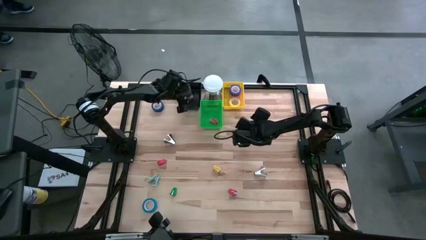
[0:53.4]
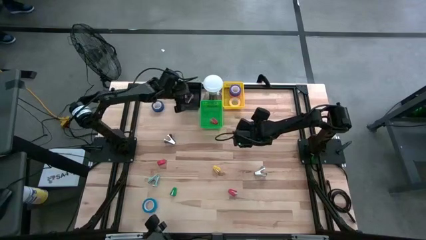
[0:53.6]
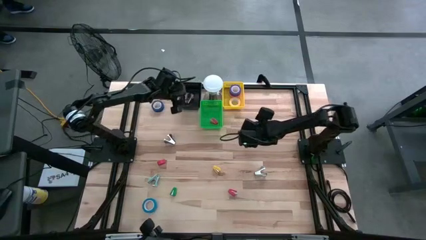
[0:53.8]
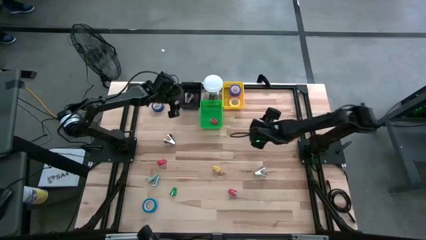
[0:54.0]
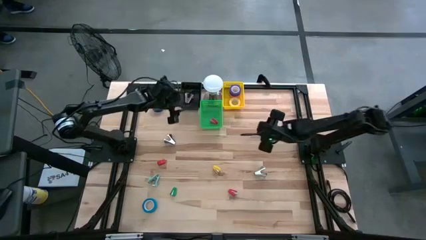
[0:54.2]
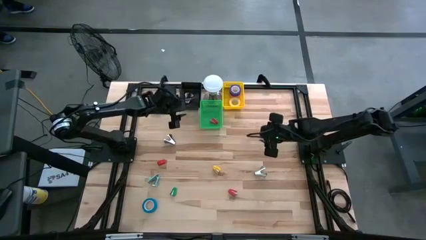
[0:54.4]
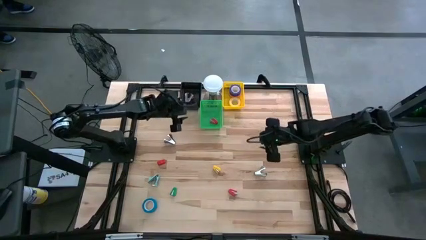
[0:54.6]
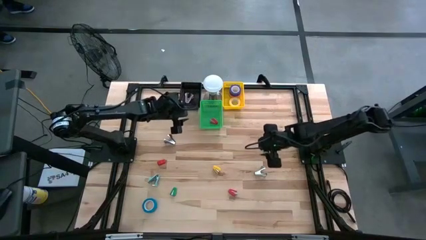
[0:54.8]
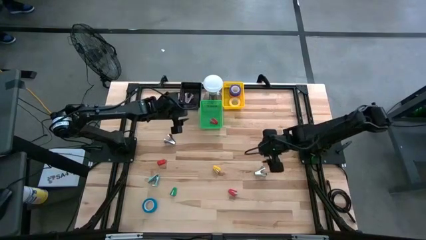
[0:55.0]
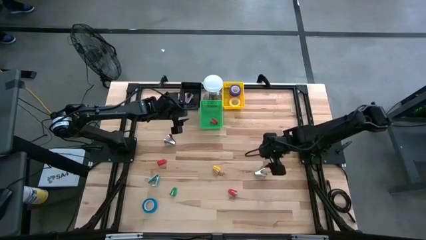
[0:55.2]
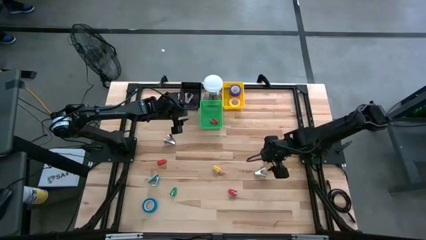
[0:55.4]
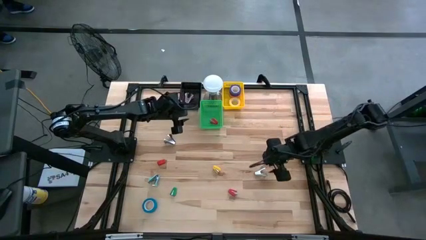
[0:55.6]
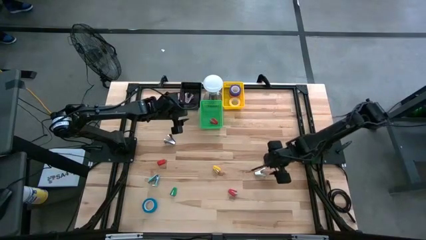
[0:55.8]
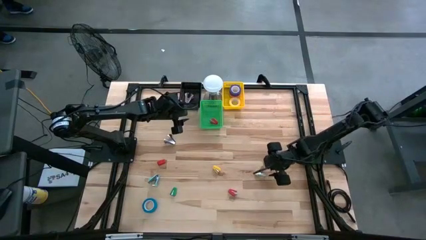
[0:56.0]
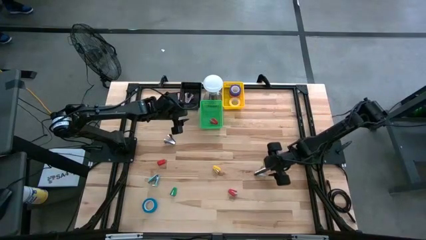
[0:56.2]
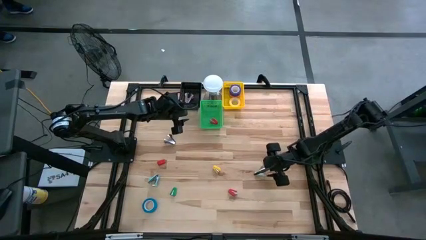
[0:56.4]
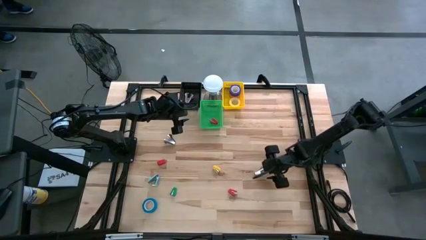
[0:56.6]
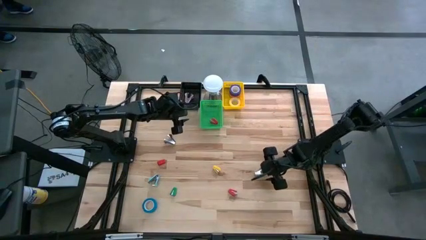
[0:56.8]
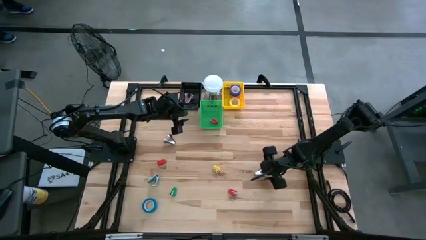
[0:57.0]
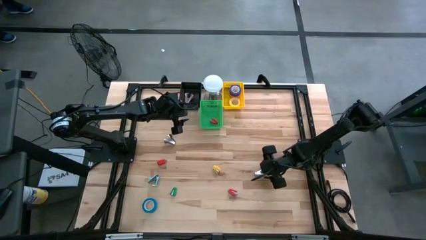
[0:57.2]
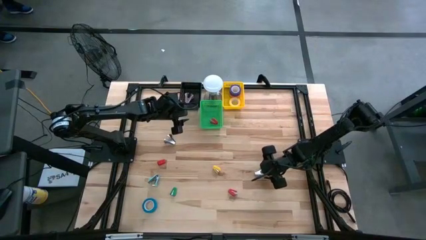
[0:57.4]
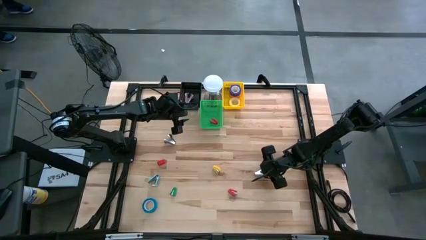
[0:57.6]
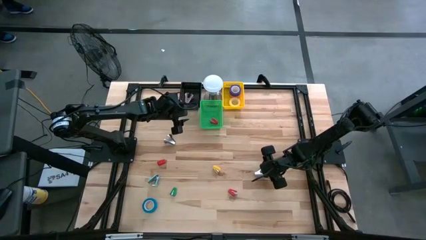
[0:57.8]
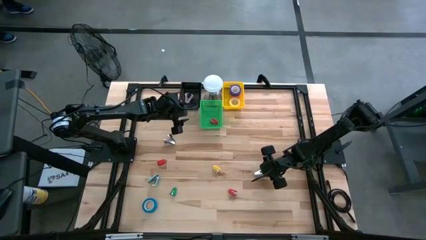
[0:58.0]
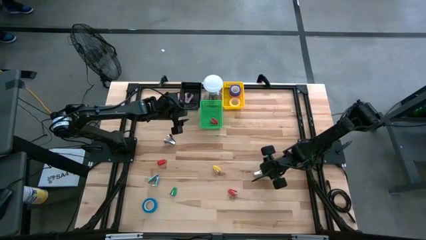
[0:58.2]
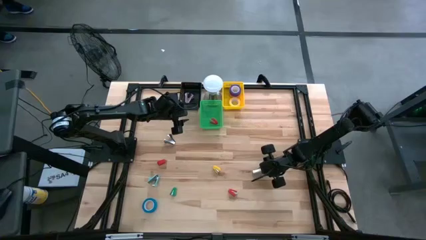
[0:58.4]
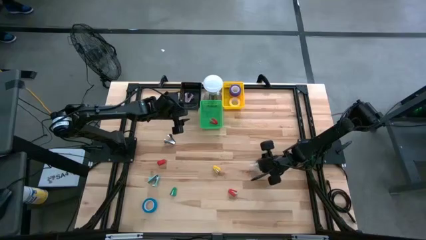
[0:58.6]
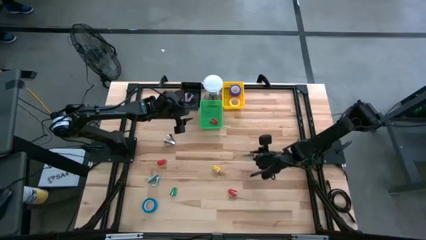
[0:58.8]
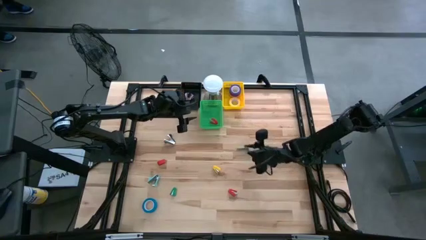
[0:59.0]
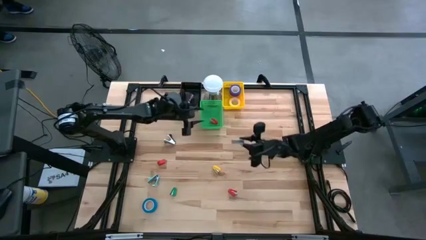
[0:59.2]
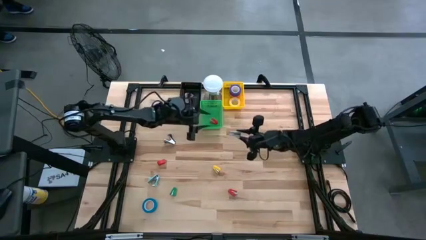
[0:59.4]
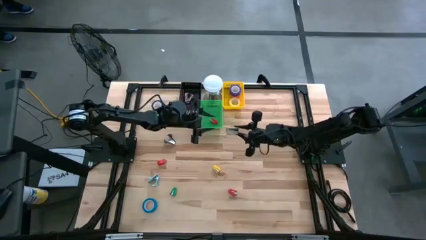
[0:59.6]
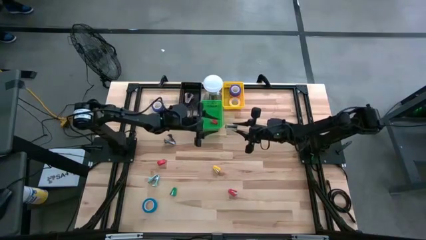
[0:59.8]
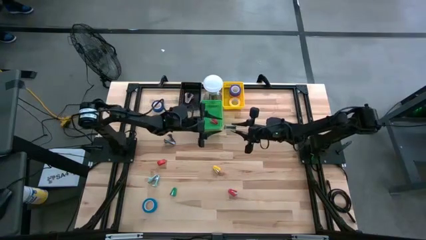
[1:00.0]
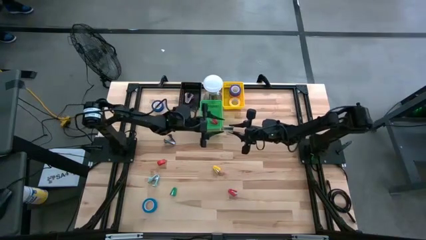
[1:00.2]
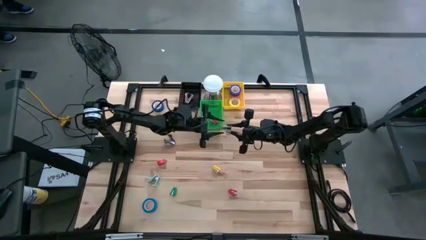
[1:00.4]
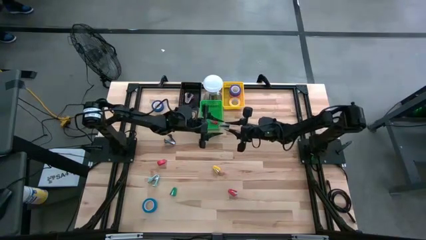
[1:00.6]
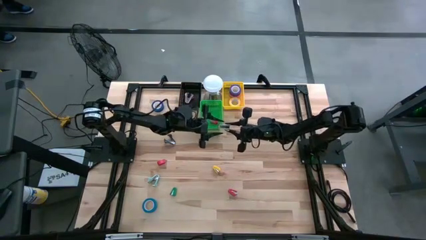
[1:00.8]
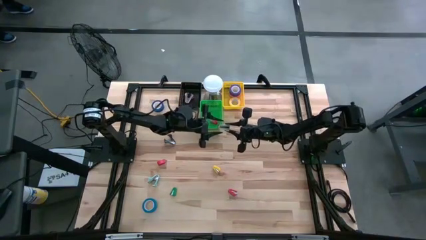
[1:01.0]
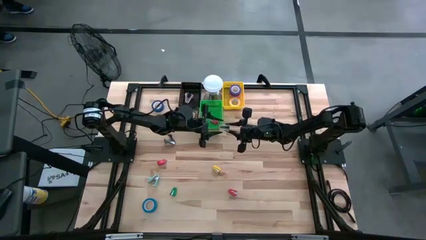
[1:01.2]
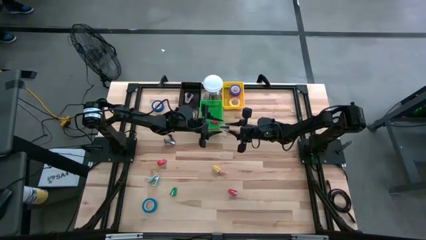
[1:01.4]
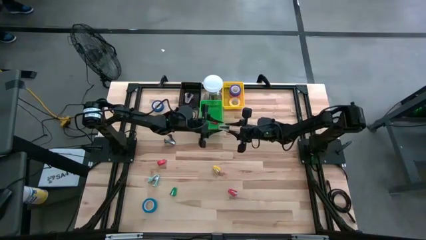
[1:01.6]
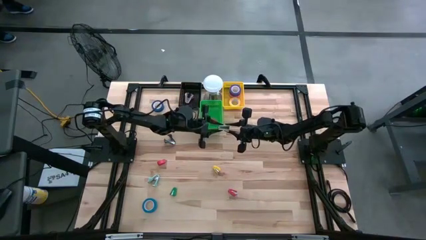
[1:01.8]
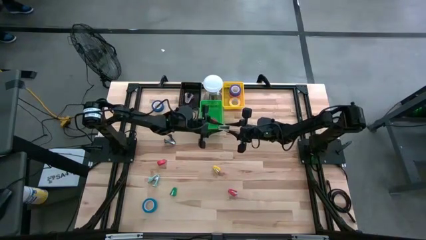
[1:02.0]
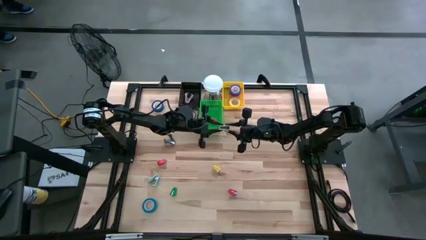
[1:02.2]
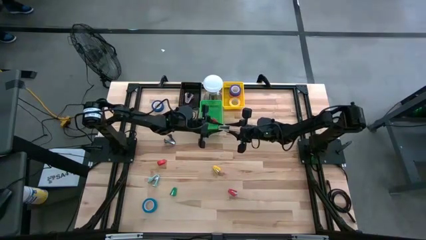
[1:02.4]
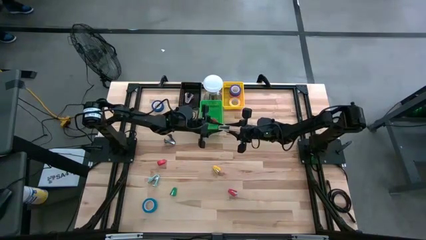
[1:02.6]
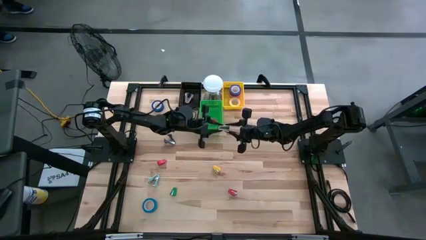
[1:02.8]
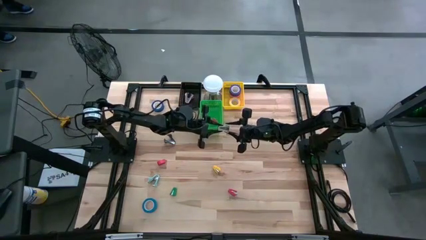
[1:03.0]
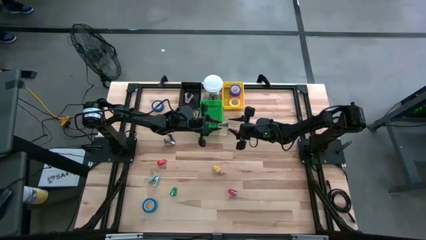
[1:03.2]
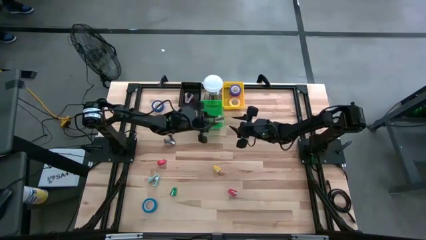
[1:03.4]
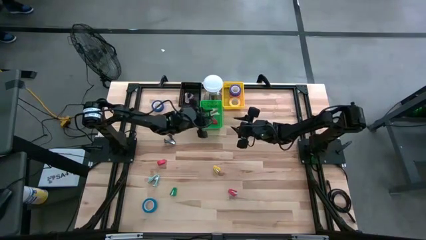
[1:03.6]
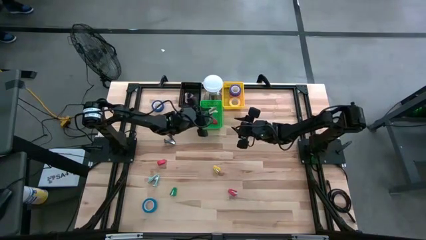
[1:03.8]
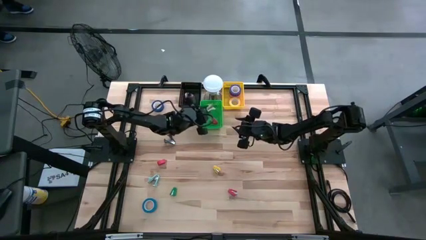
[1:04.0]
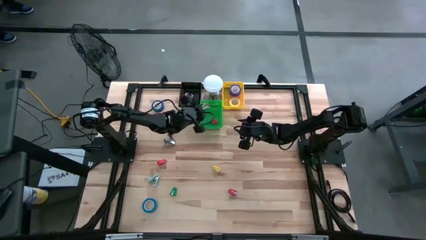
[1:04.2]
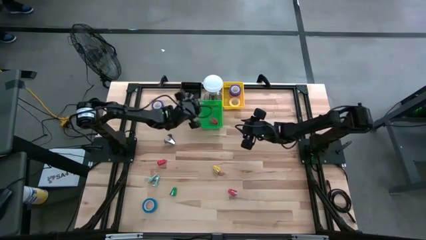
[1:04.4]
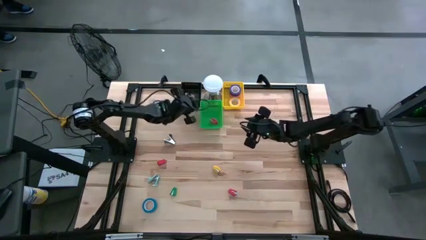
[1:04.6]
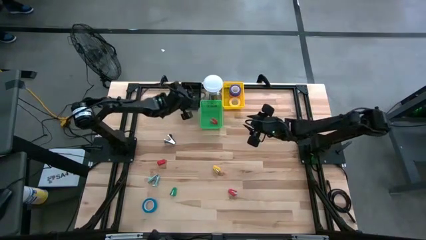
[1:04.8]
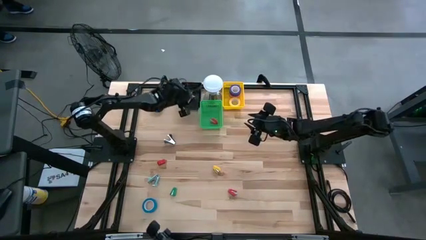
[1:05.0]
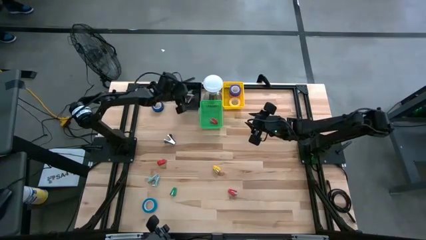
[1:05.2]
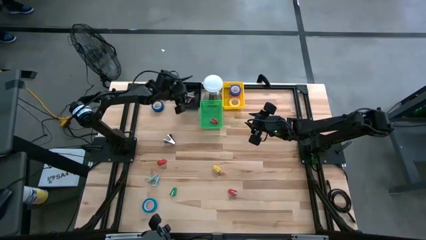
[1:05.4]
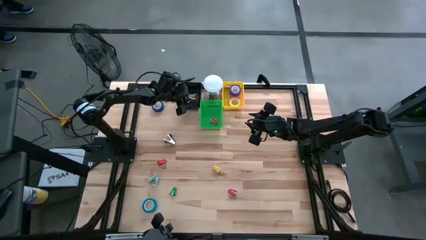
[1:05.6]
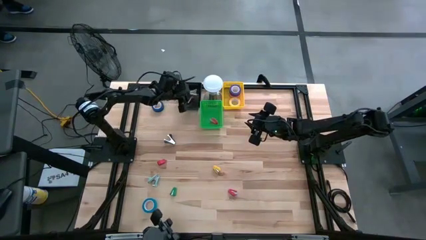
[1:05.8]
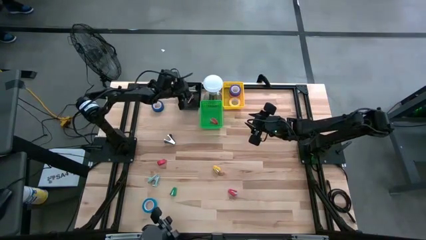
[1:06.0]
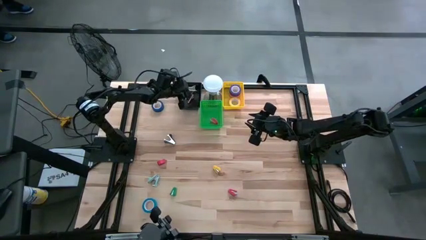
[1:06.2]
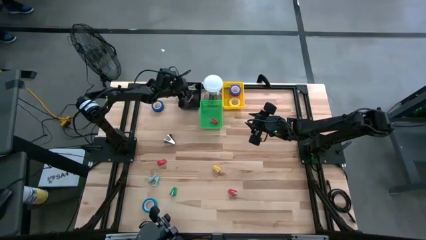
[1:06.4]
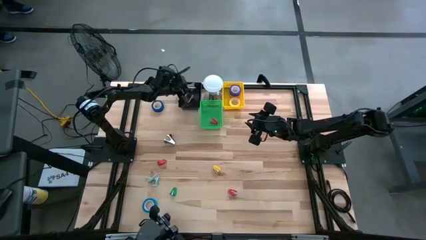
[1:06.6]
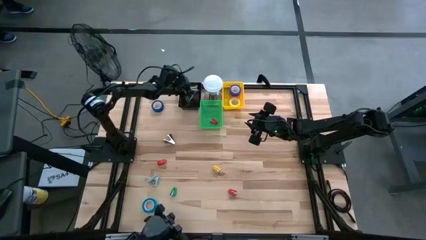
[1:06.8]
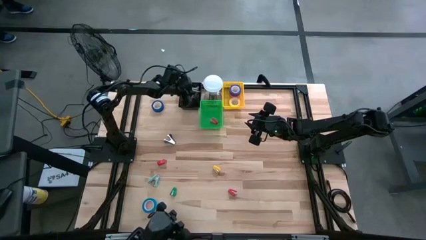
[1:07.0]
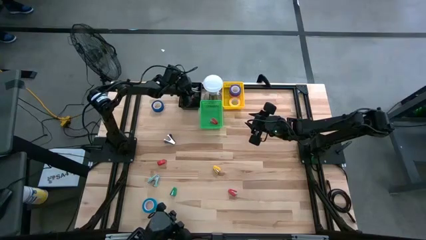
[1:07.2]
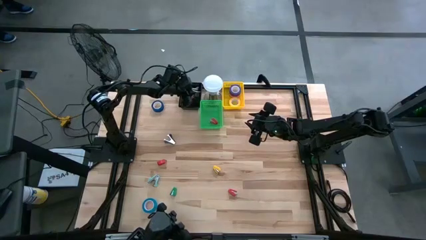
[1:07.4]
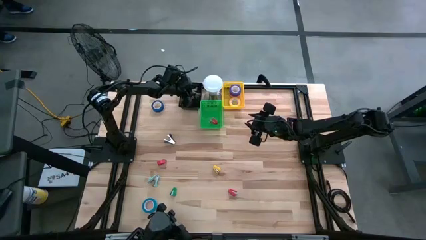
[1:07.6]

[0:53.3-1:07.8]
Task: Pick and place Stapler, Stapler remover, tape
Put the light gray staple remover into the black bin

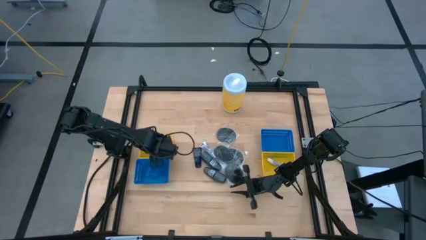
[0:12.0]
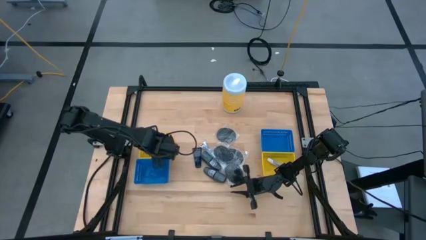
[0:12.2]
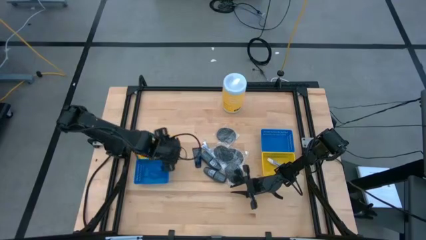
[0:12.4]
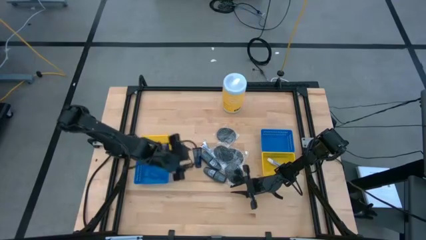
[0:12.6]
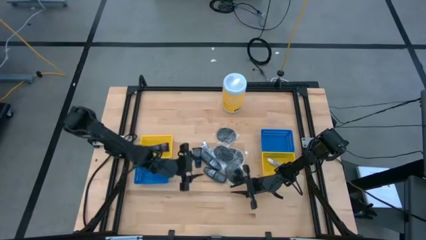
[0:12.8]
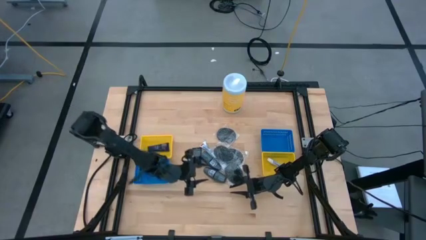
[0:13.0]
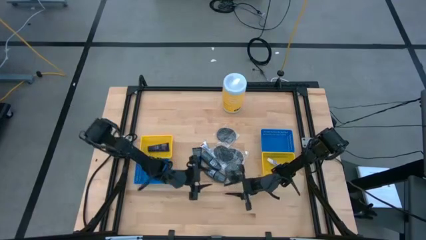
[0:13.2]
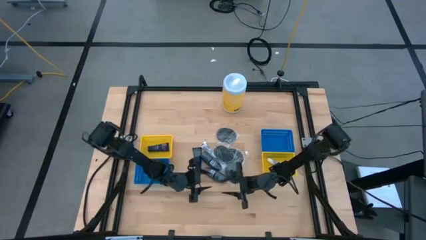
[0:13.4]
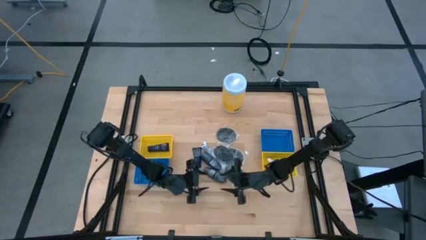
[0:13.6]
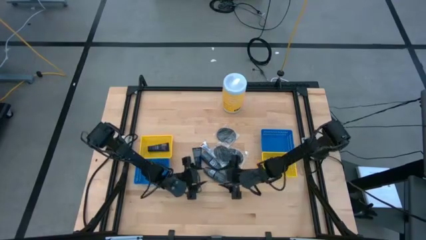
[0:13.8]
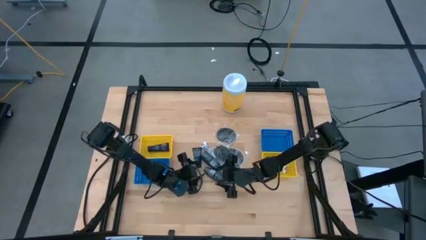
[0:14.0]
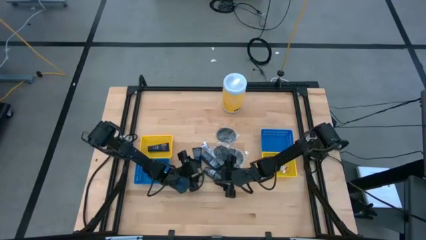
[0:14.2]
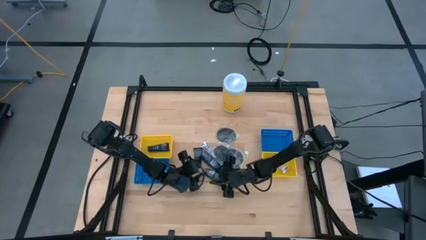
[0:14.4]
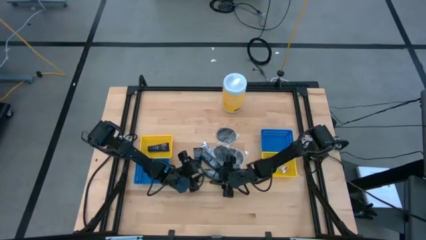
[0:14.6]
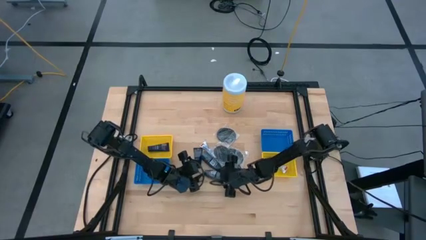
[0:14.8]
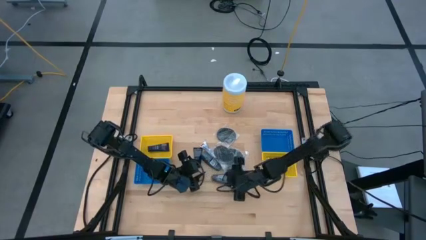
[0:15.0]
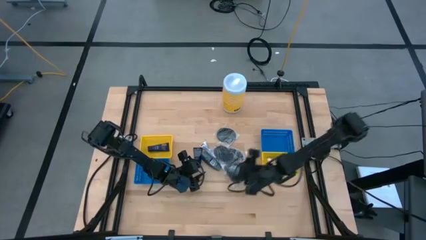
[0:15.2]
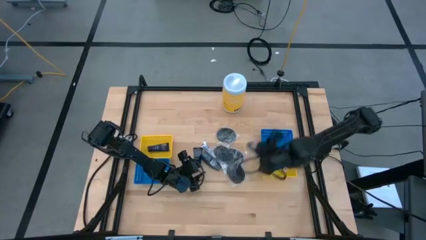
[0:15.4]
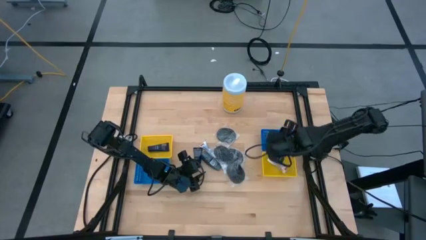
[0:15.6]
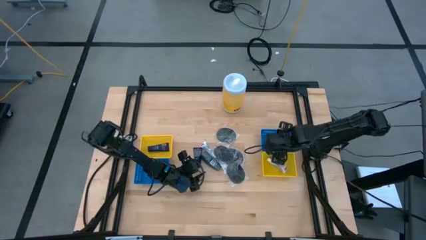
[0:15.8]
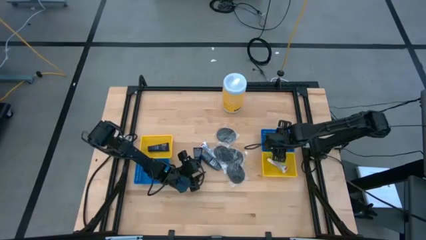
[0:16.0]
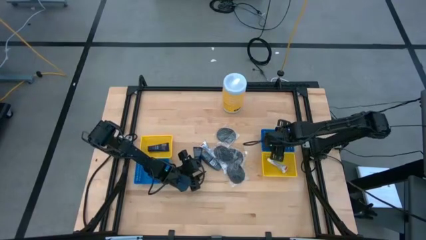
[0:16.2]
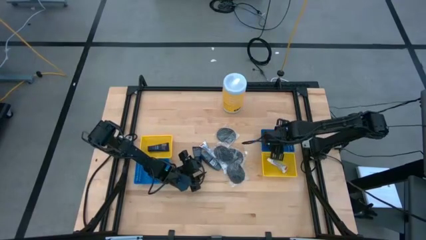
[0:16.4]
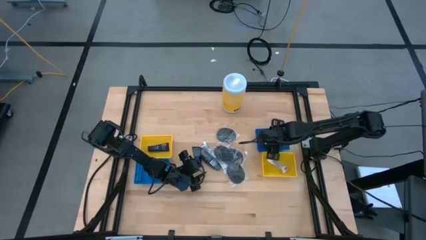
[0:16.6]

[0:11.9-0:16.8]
Task: Pick & Place Travel size toiletries
Put the bottom black deodorant into the right blue bin
